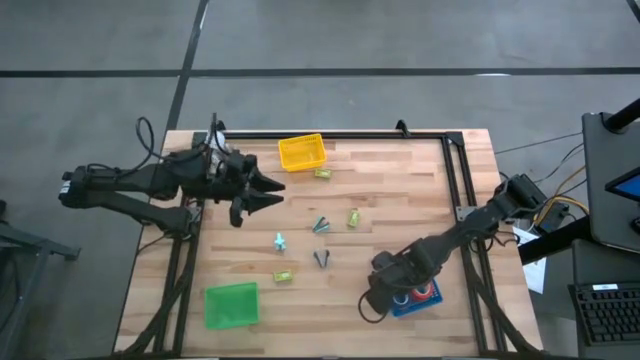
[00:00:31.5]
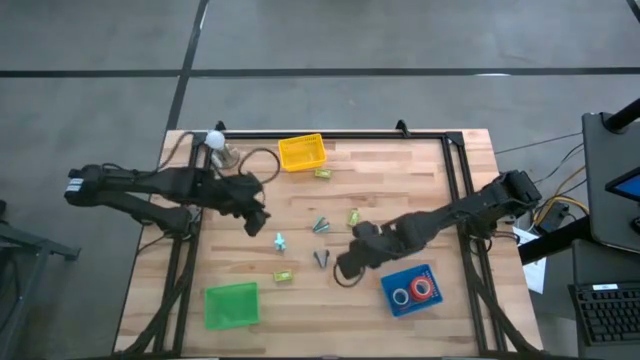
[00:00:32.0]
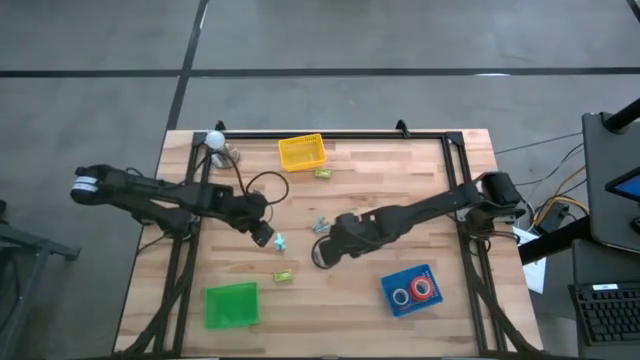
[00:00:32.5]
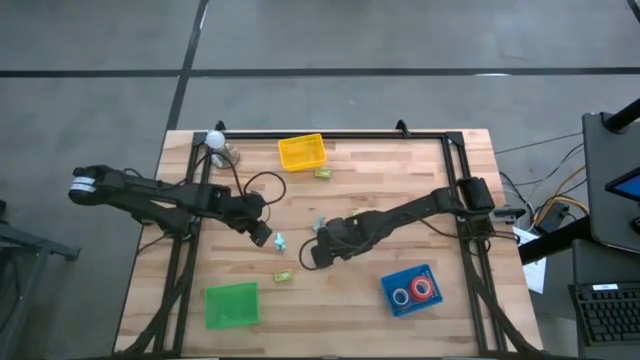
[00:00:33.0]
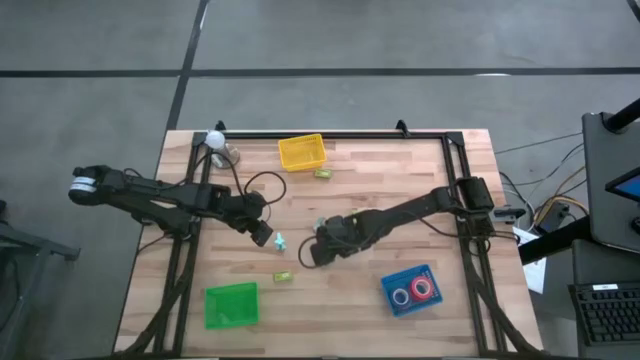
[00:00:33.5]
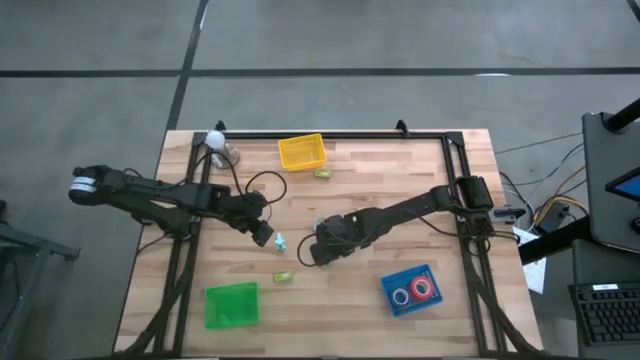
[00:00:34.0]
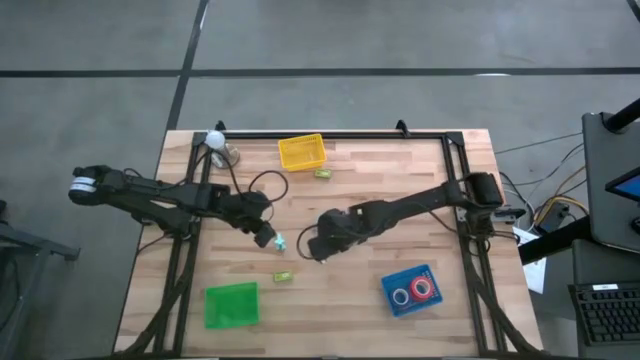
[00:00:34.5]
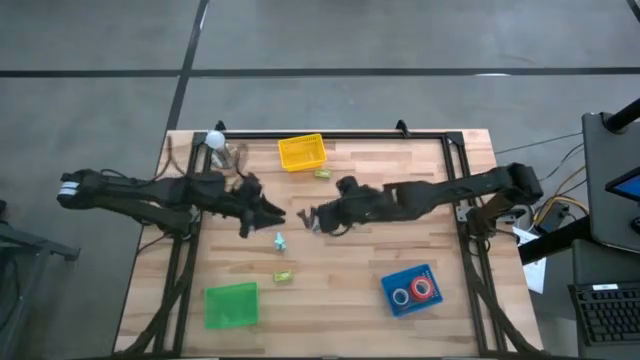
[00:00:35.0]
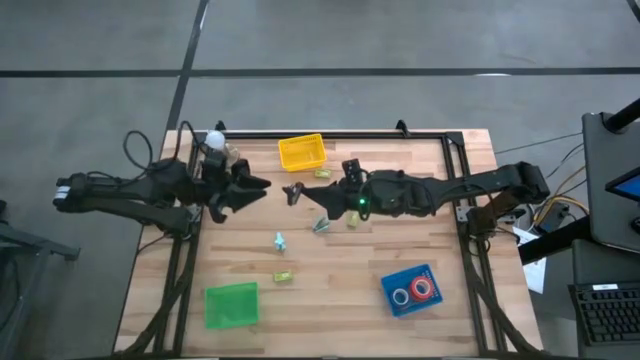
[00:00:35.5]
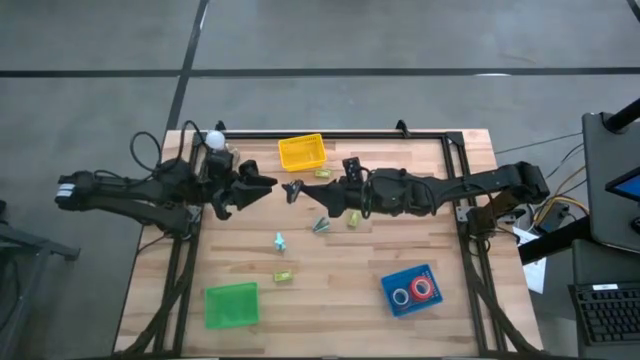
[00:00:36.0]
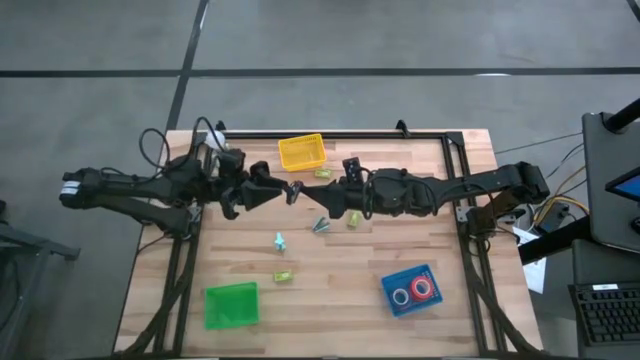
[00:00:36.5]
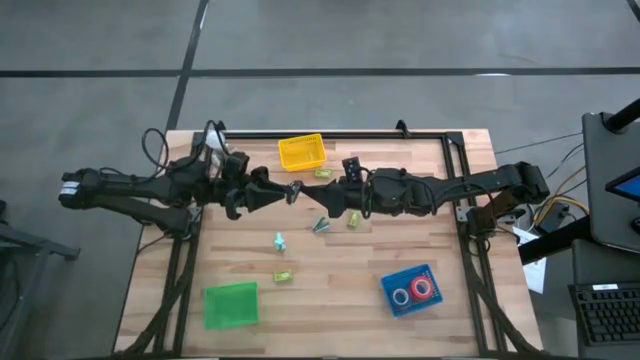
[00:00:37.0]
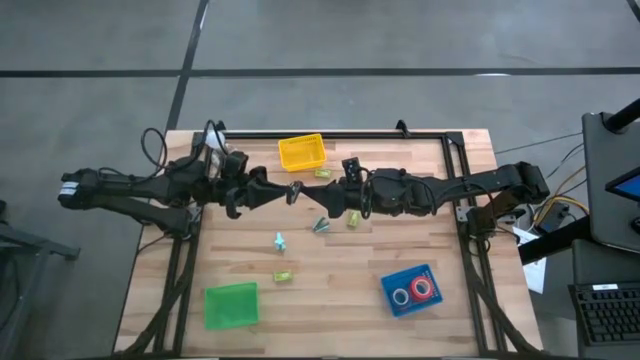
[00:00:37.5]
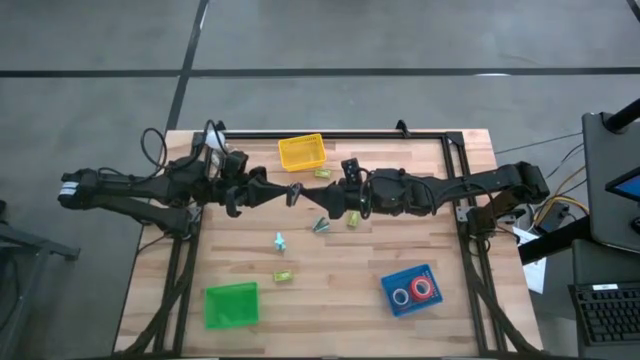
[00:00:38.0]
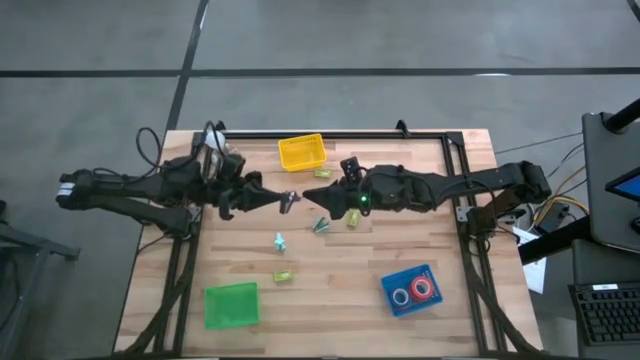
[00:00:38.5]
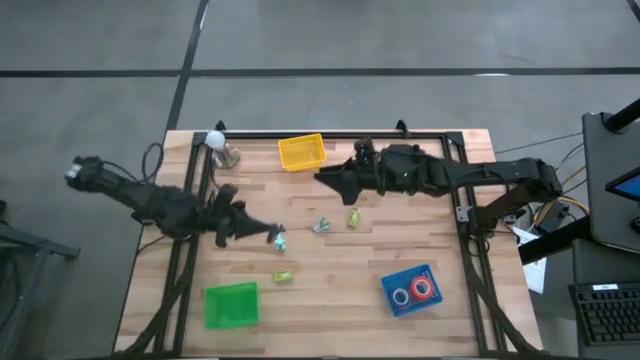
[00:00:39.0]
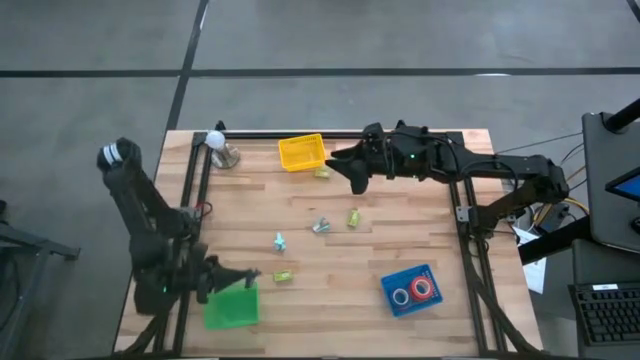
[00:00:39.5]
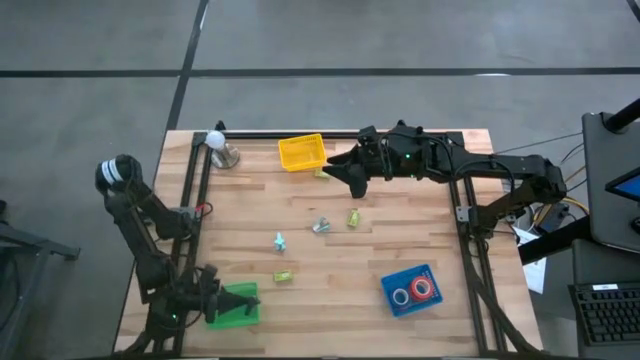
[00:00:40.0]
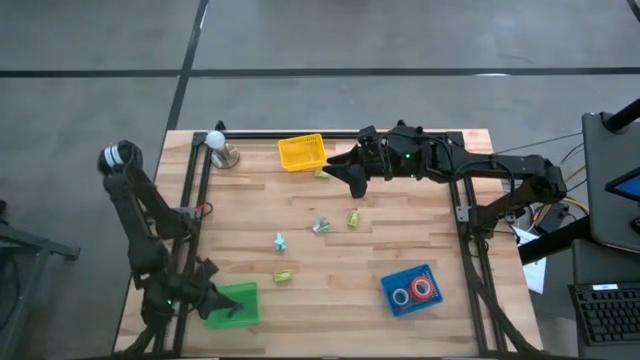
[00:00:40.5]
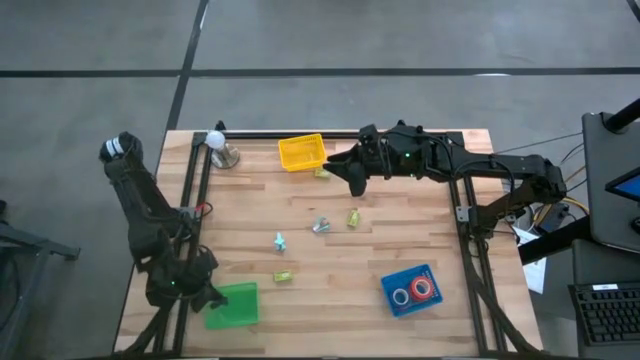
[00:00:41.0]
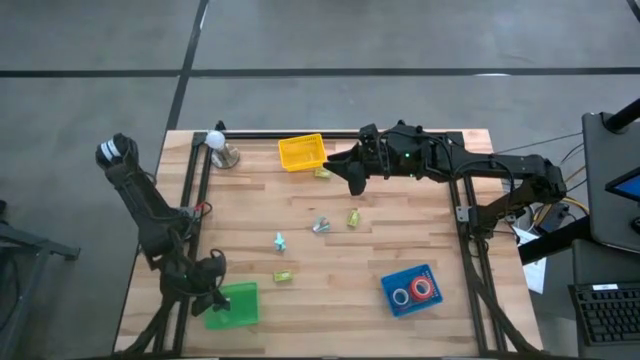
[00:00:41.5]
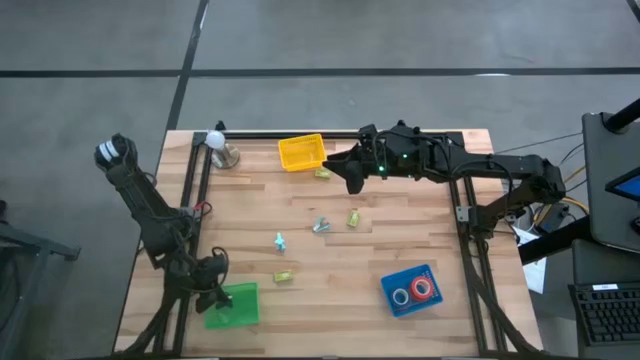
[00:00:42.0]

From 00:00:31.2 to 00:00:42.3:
Task: Pick and place Stapler, Stapler remover, tape
Put the black staple remover into the green basket

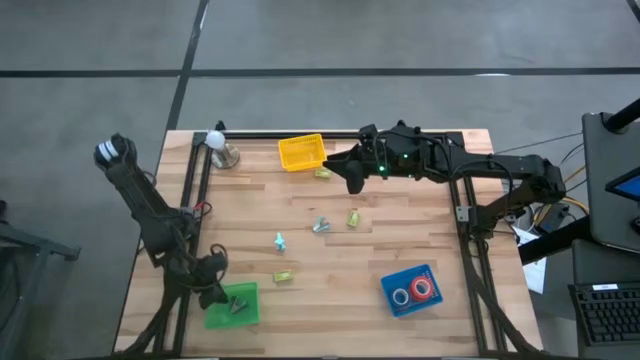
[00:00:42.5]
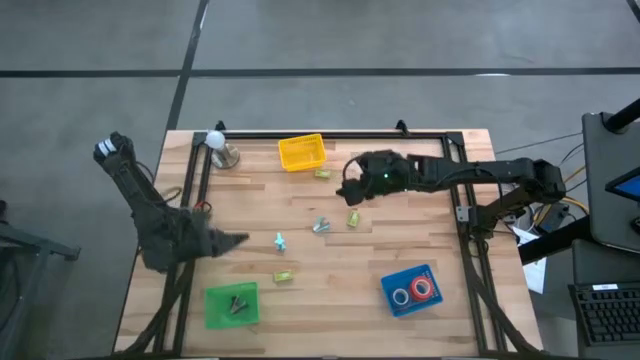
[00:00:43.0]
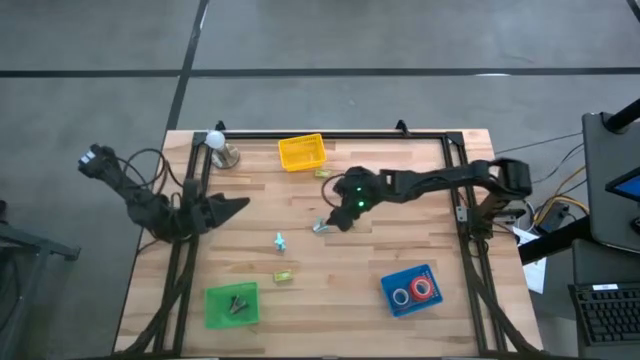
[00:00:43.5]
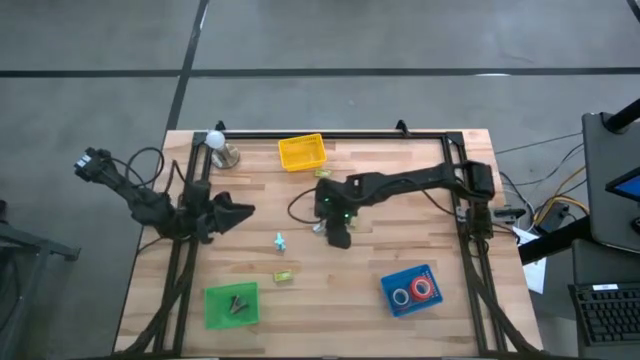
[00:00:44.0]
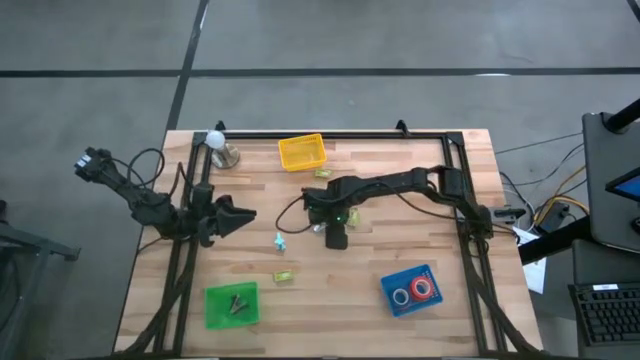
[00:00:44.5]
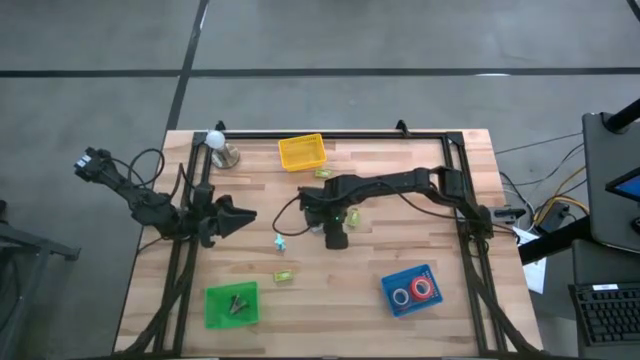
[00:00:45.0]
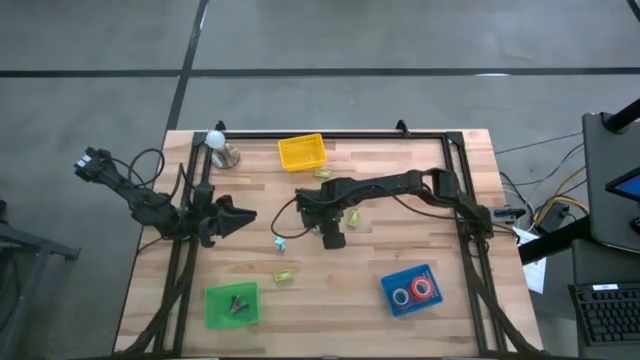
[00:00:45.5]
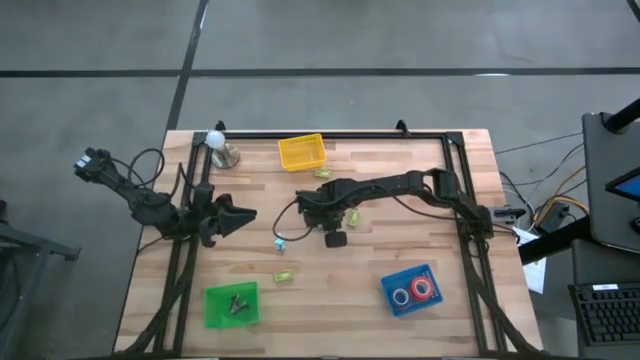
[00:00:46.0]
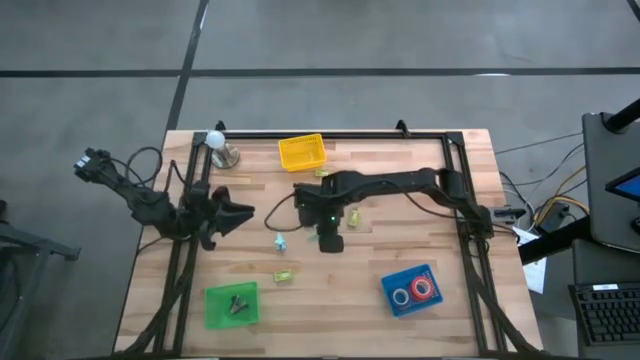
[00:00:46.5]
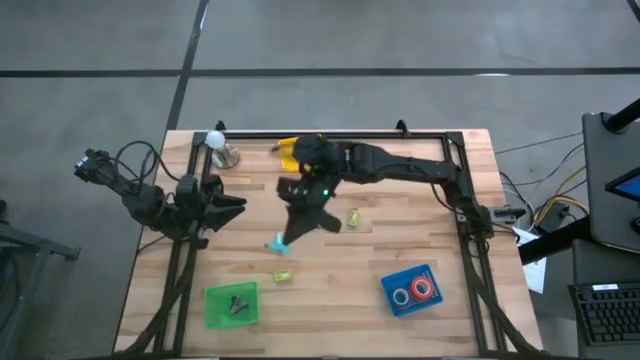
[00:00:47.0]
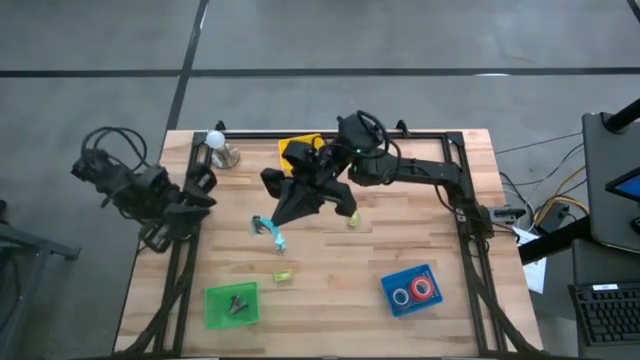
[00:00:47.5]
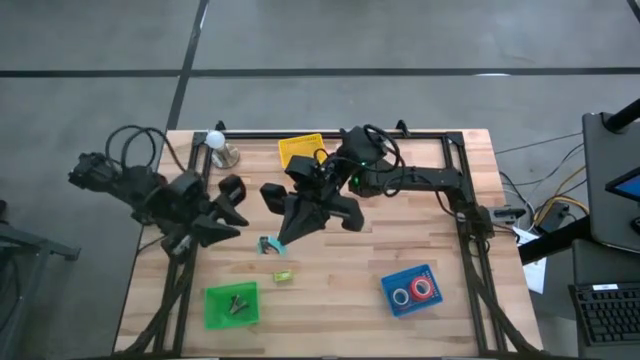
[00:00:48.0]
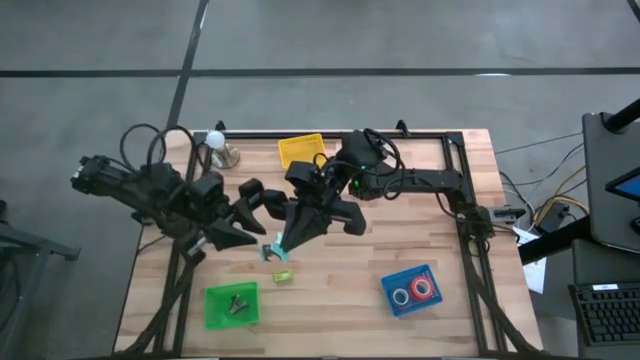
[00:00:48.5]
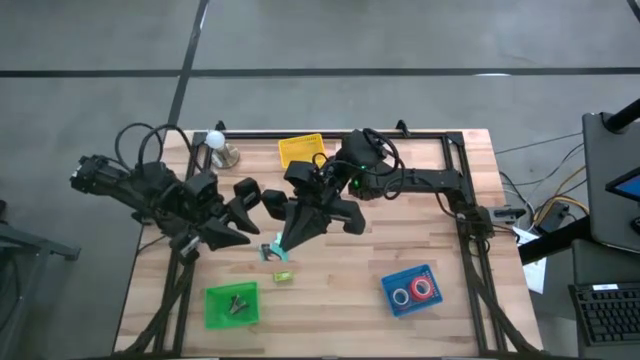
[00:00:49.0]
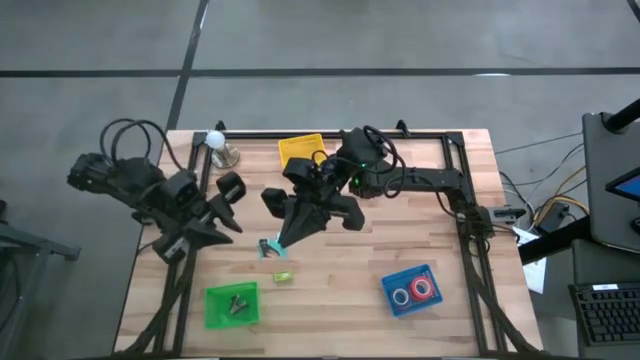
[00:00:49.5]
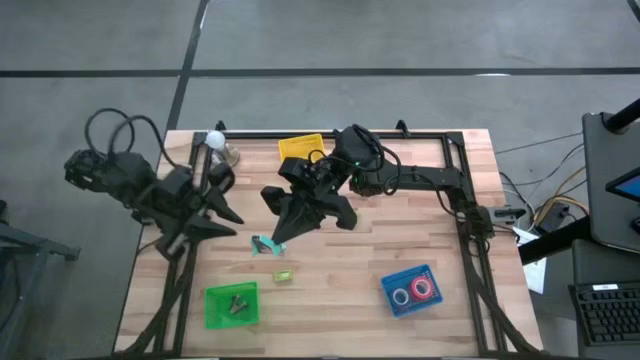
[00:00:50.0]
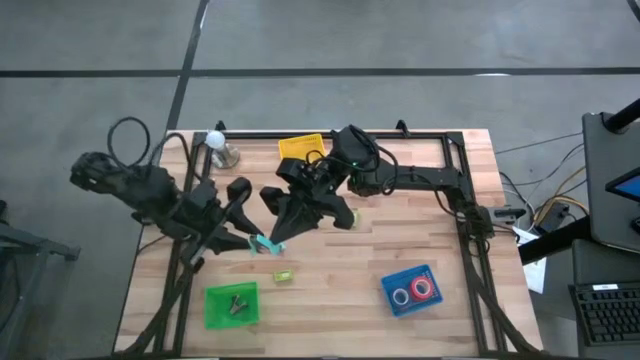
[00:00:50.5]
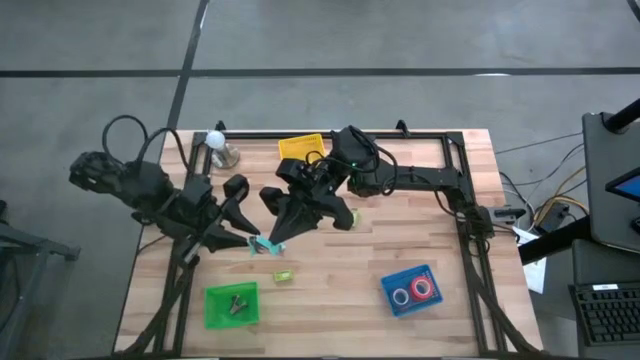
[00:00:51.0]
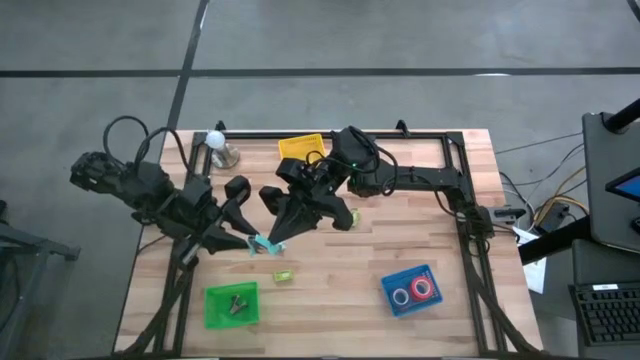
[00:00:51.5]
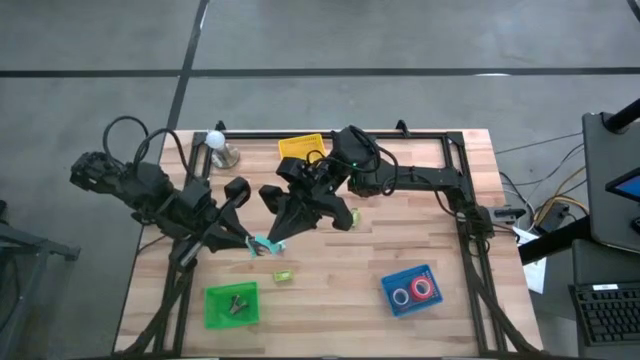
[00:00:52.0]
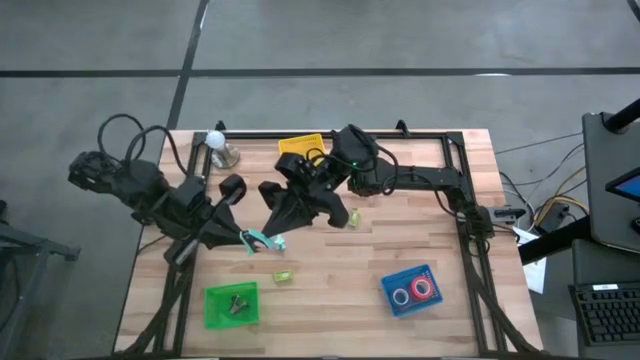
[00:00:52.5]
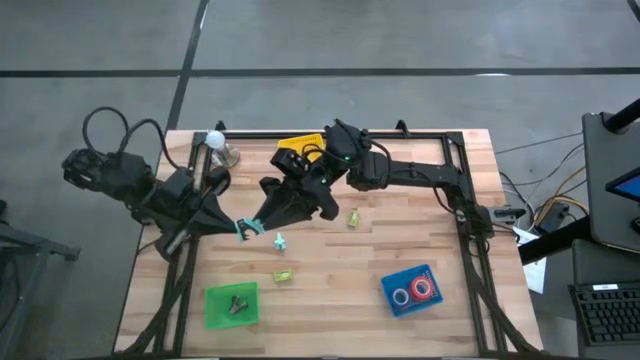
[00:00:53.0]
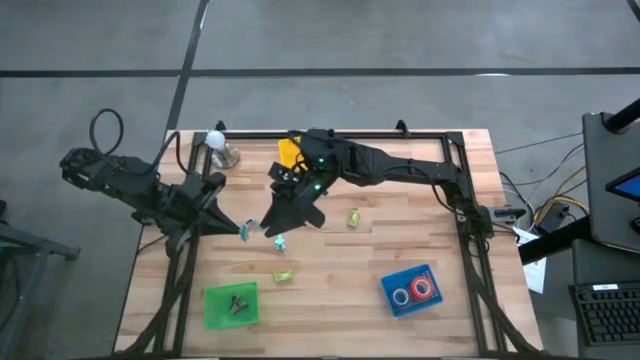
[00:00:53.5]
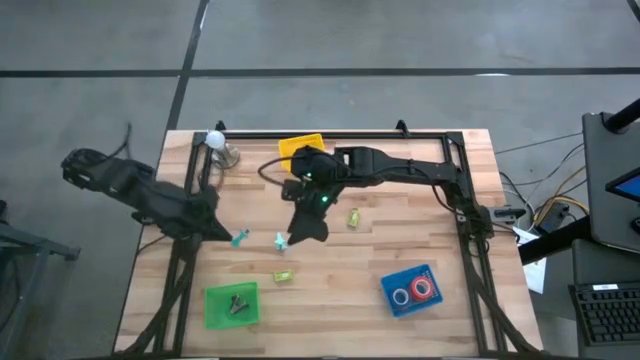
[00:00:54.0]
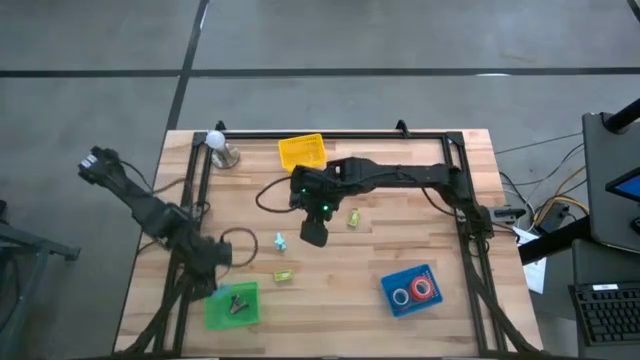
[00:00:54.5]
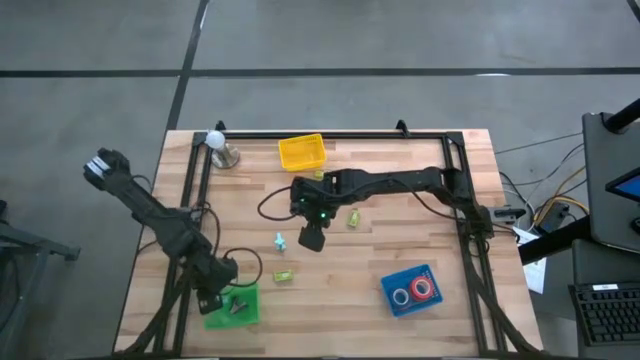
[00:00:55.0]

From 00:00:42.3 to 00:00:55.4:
Put the right light blue staple remover into the green basket
